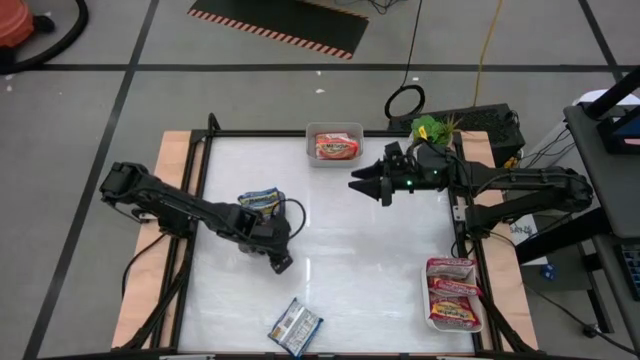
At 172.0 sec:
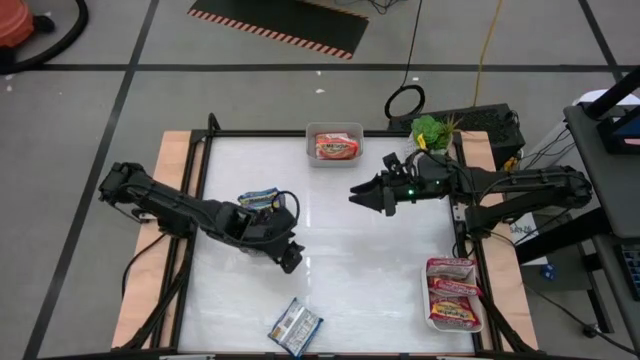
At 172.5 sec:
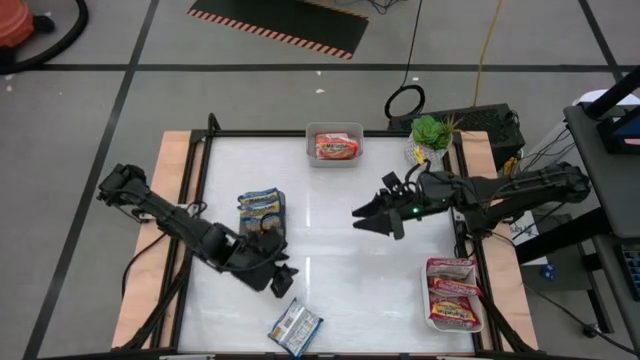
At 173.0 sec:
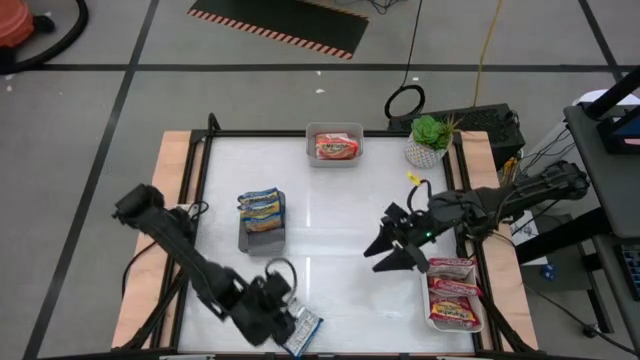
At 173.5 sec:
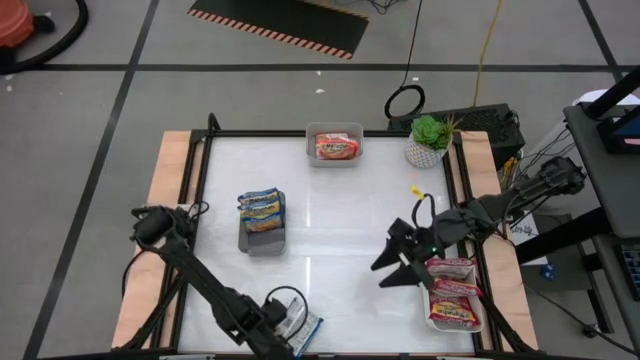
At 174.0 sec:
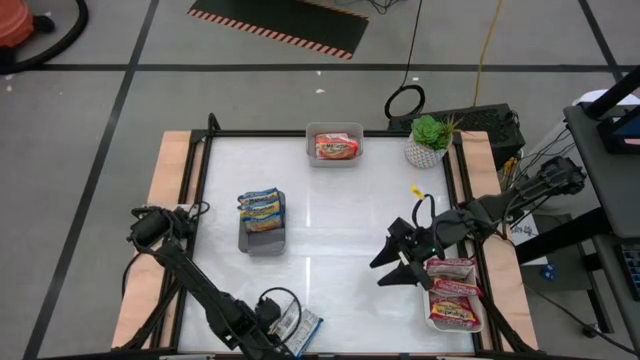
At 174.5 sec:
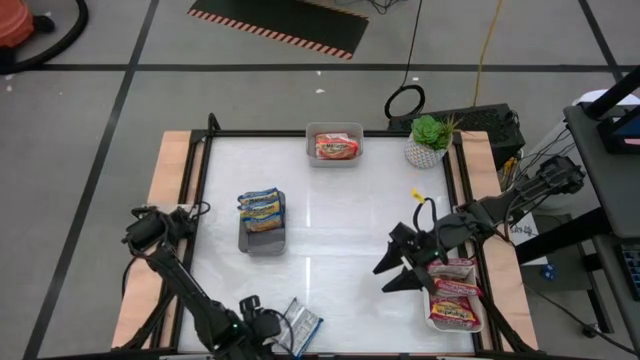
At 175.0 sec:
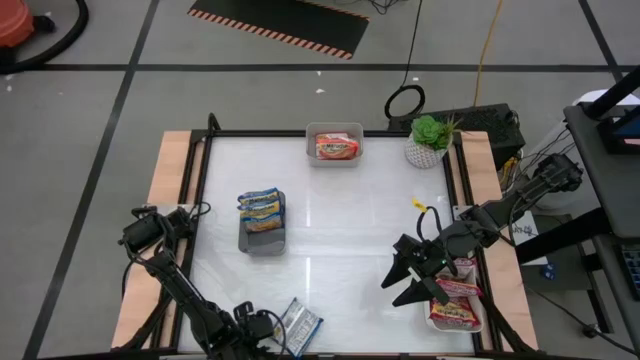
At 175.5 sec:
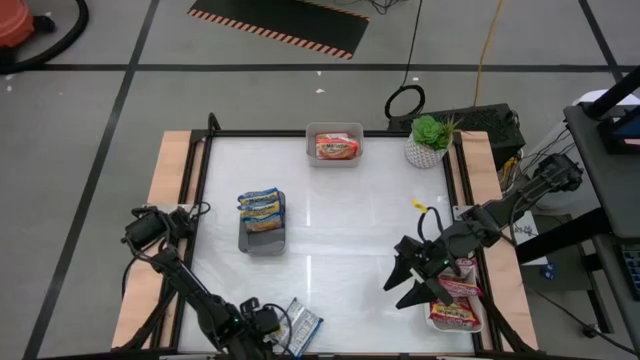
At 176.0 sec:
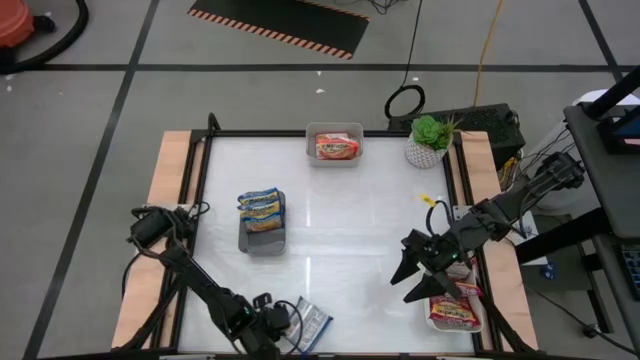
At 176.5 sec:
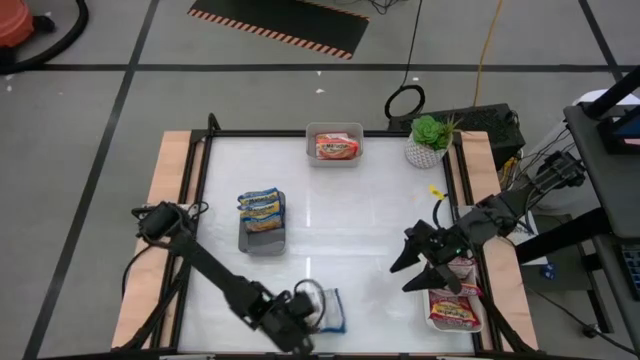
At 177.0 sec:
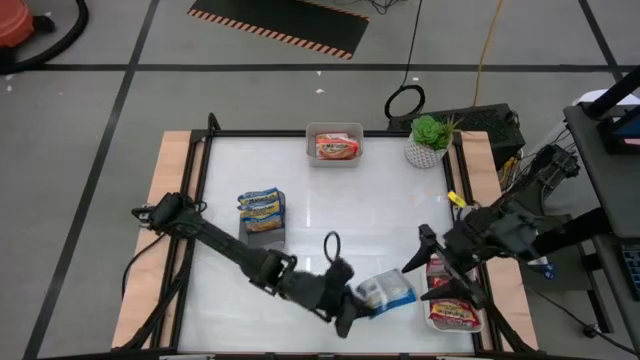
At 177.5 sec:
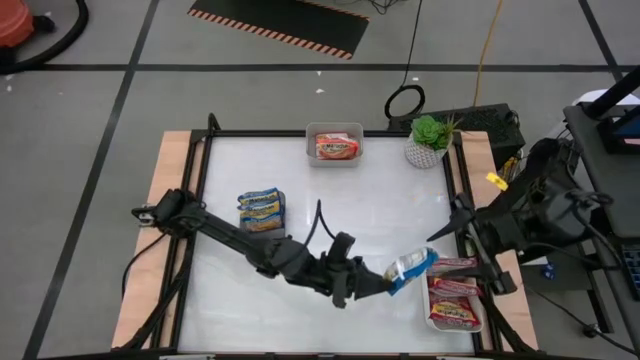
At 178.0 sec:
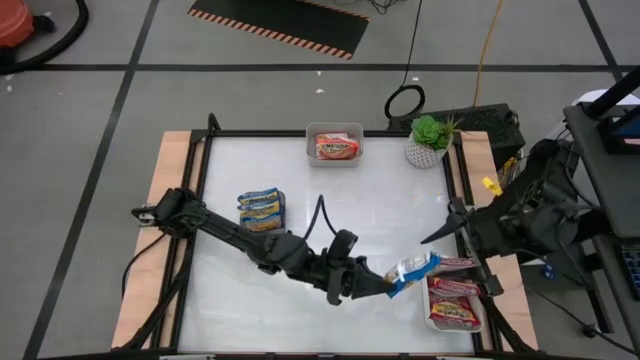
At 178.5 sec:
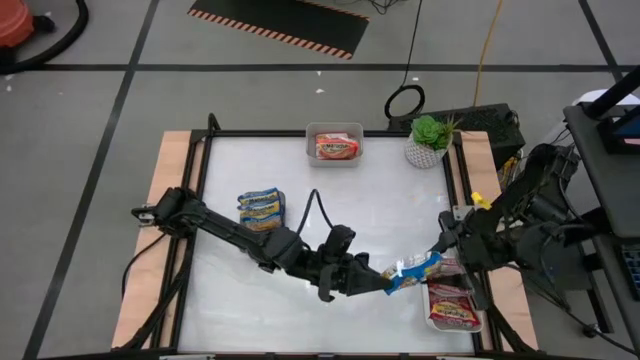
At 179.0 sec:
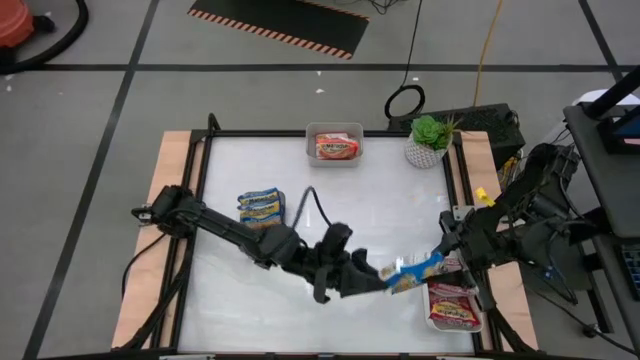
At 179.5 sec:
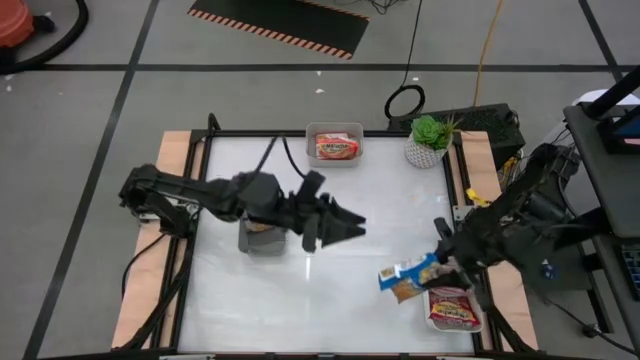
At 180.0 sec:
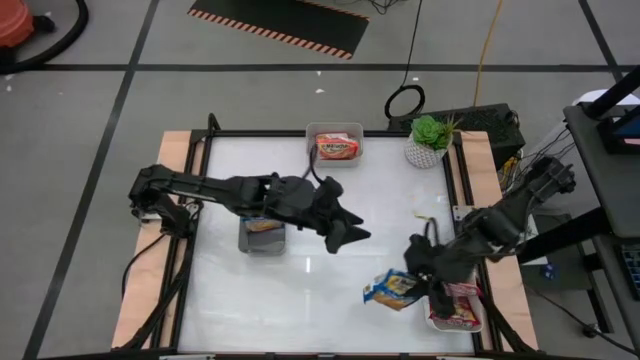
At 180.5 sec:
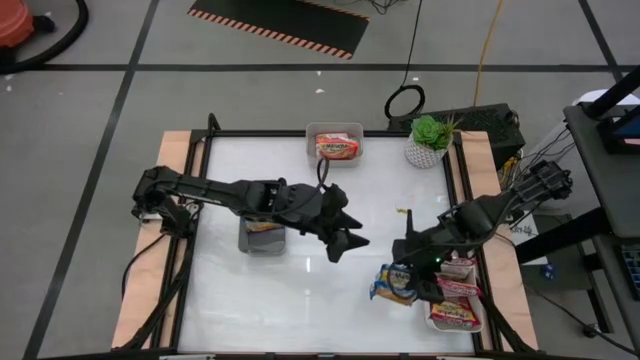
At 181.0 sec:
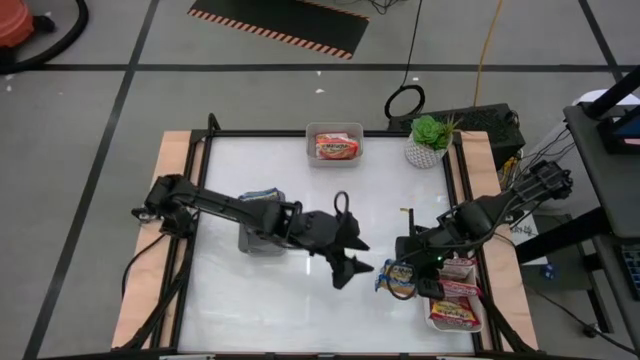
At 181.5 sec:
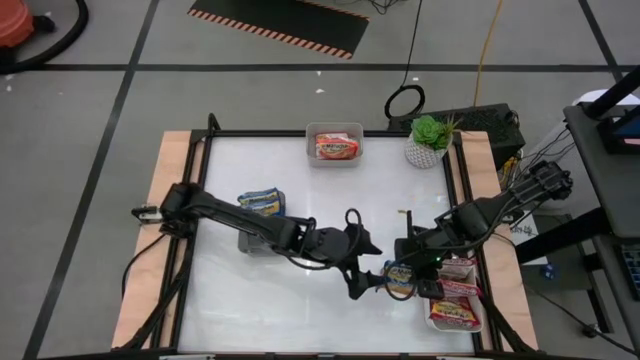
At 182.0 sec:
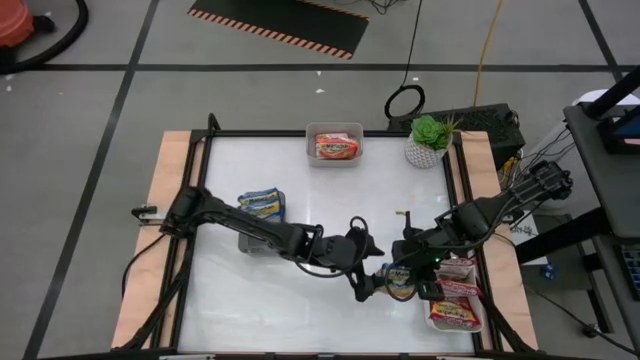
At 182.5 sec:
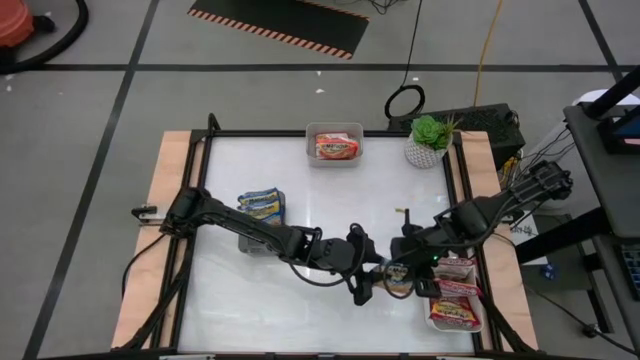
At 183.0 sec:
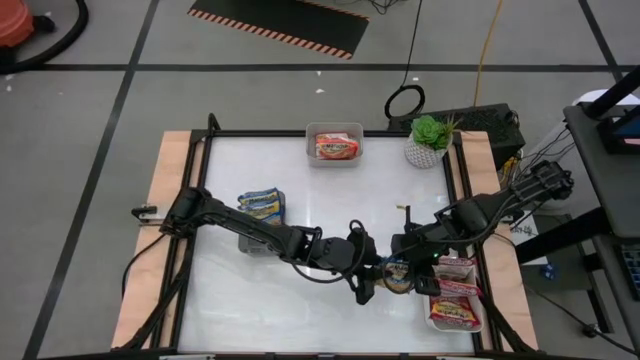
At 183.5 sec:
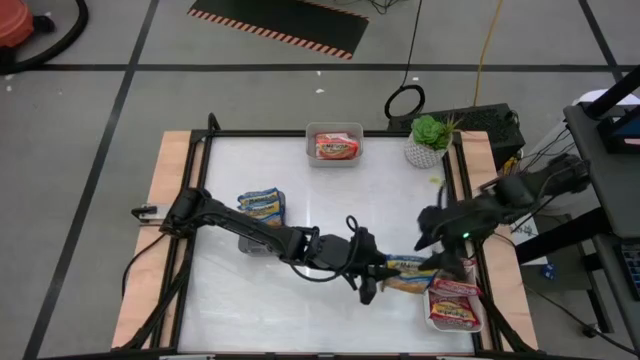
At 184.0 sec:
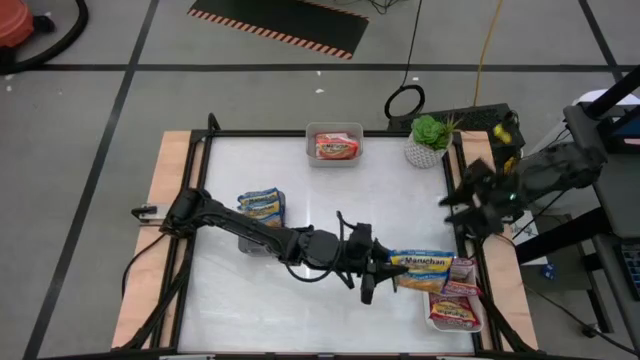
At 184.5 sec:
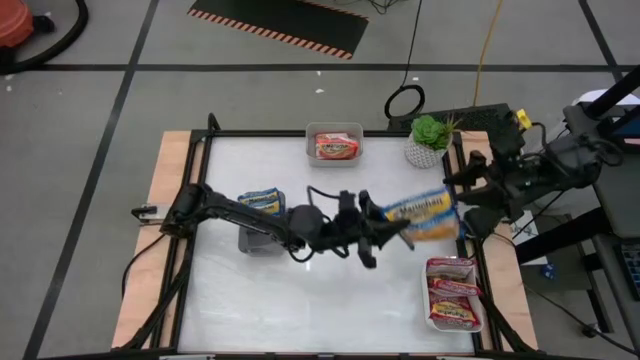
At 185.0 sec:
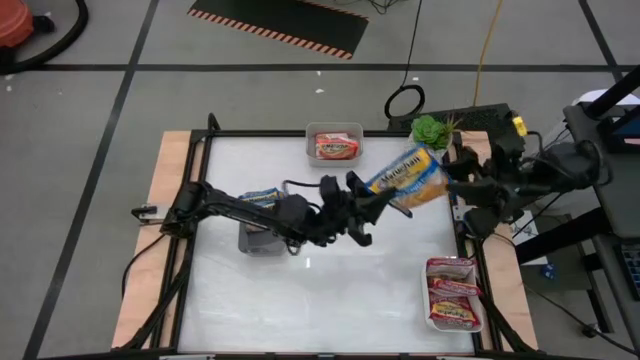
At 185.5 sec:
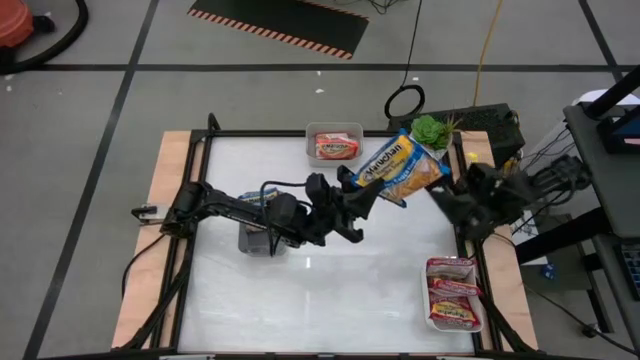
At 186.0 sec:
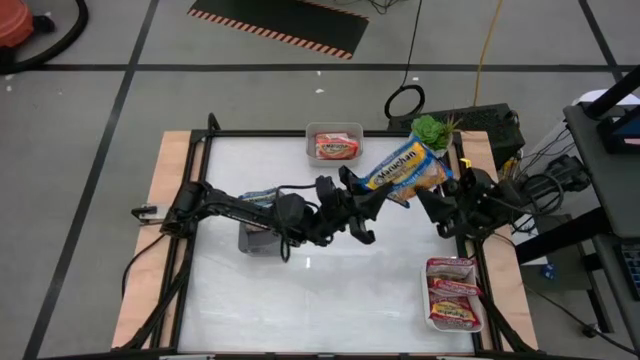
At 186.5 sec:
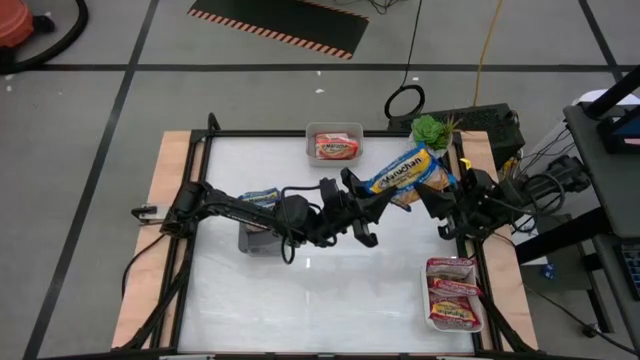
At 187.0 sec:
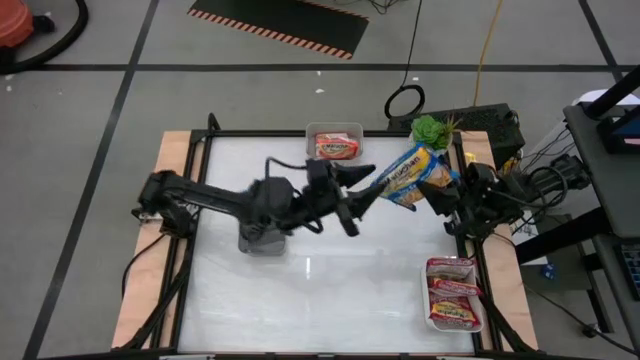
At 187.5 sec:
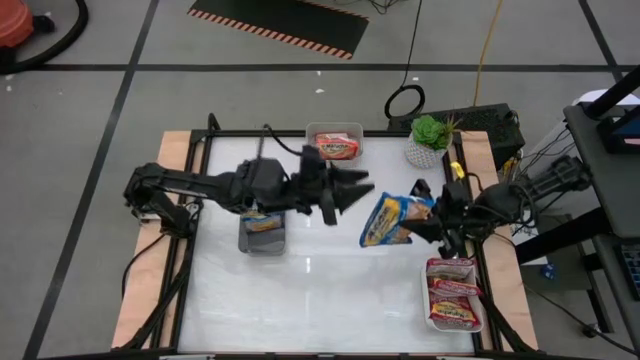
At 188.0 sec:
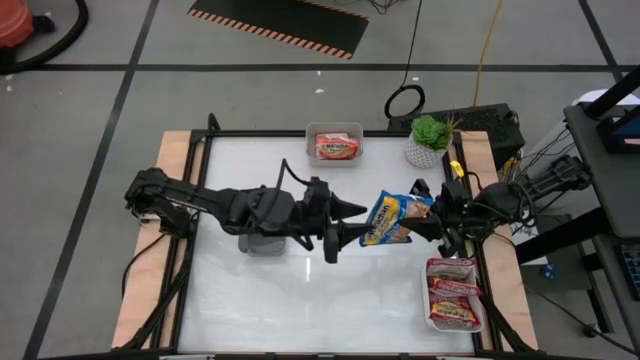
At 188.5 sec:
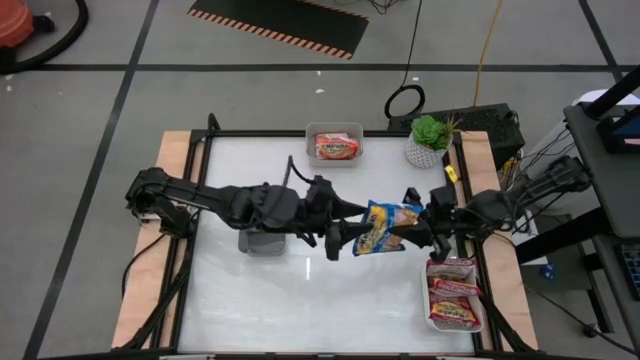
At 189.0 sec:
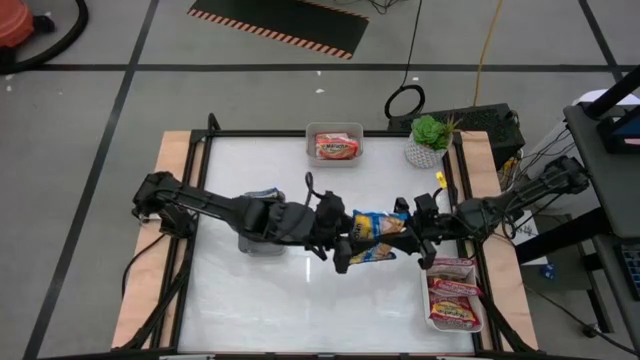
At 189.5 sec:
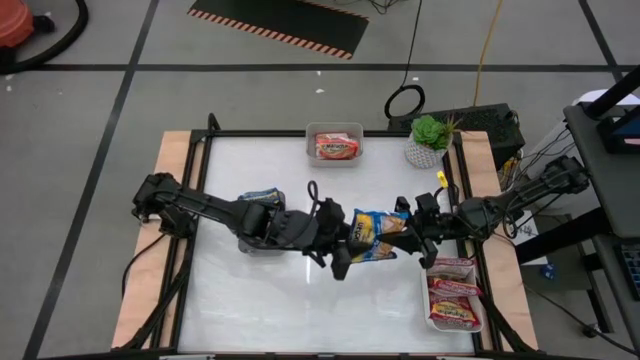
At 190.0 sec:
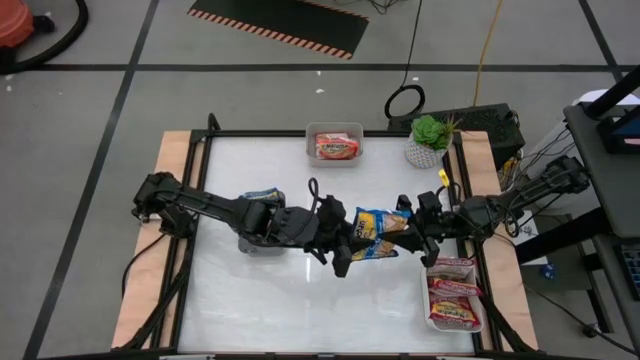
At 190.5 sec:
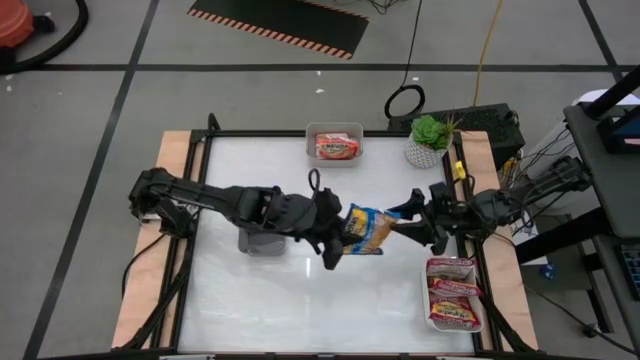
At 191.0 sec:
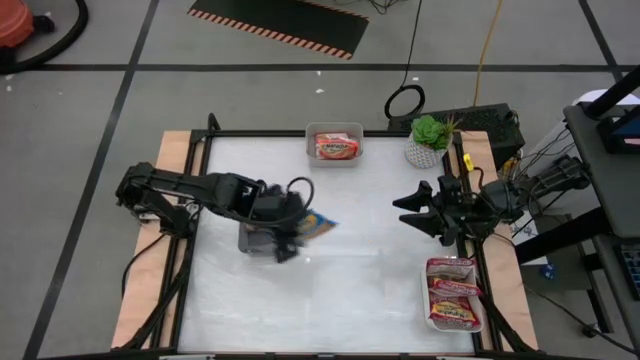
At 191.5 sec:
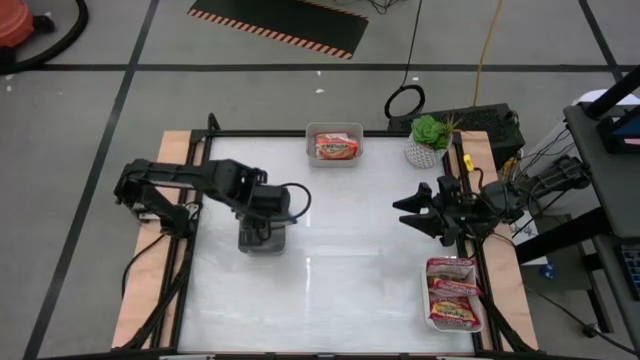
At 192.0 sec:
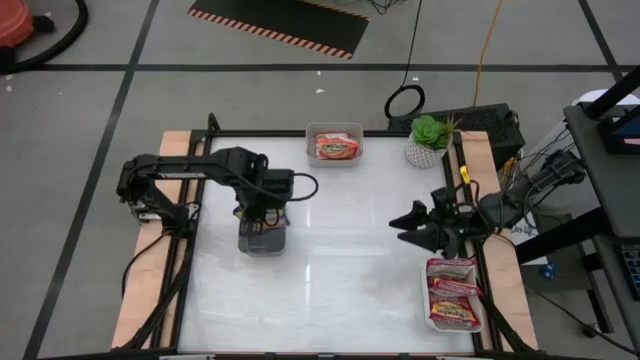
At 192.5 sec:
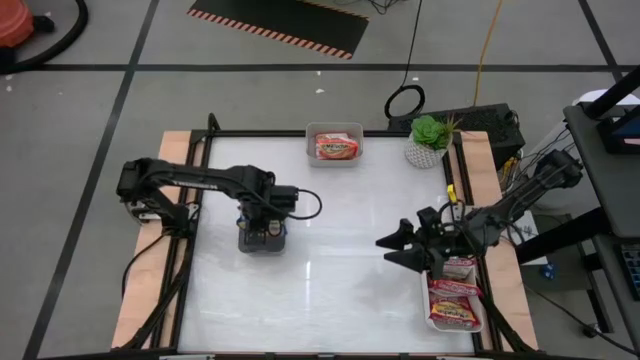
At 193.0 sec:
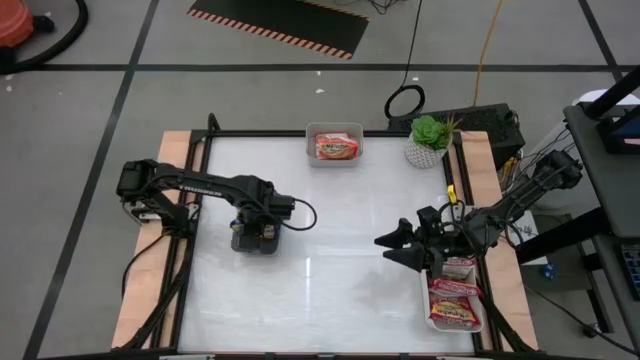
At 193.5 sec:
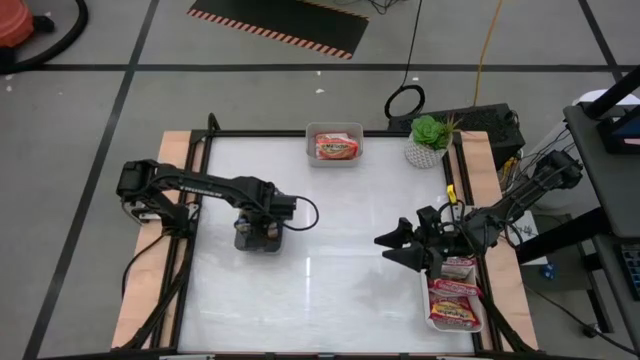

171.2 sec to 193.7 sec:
Task: Sort Maruchan noodles
Put the blue noodle pack into the black bin
